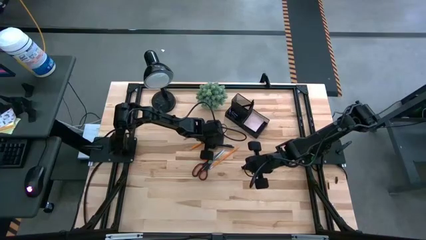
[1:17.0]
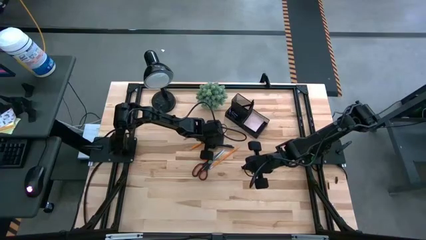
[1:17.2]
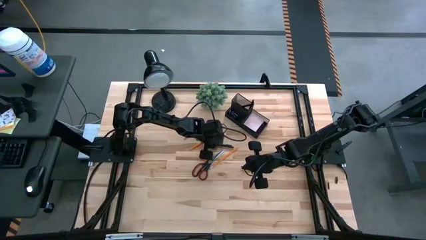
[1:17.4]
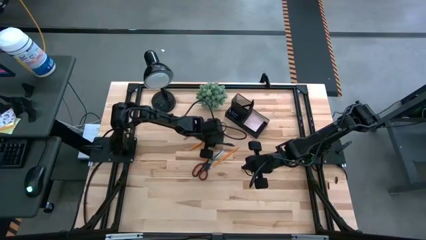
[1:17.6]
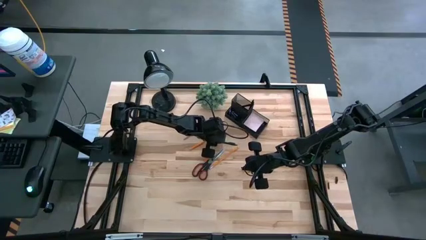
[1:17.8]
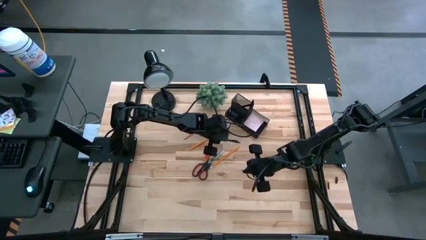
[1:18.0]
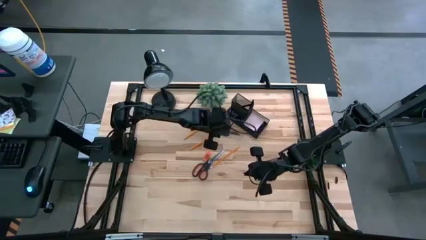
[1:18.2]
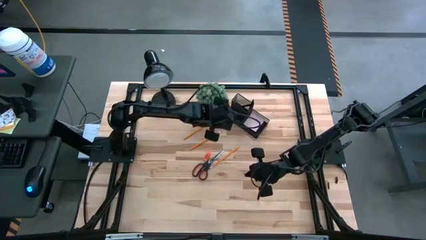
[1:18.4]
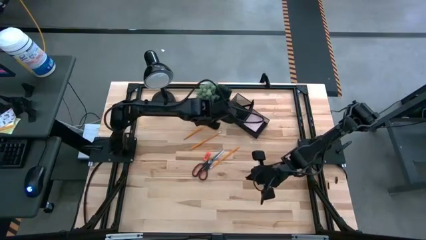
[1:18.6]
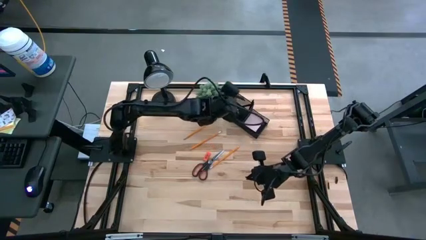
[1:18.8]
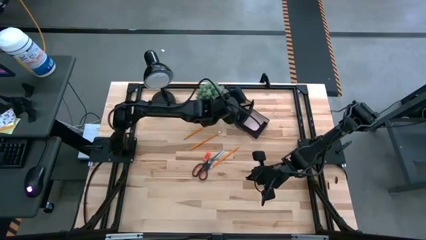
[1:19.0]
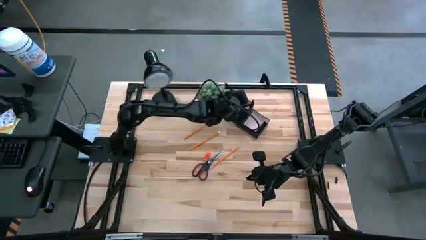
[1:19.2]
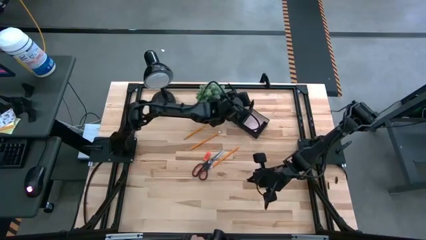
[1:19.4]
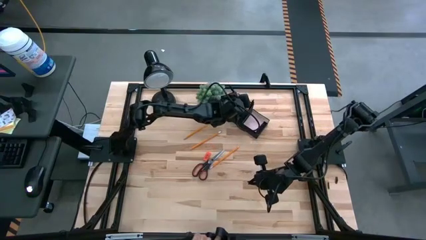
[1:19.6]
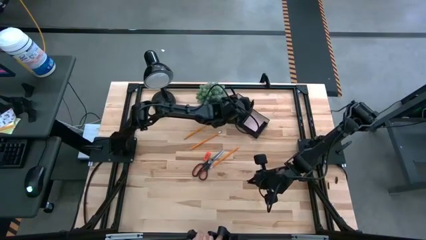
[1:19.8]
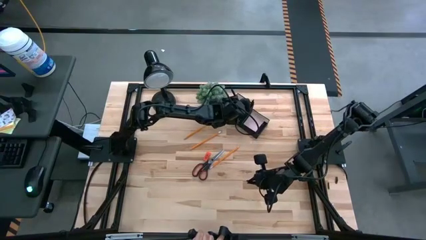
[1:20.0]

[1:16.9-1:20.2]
Task: Pick and place office supplies into organizer
Put the black ballpen into the black desk organizer

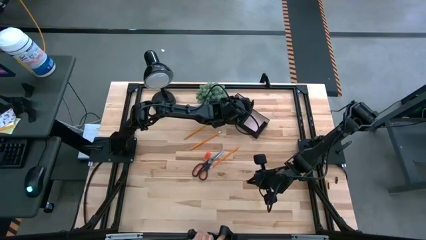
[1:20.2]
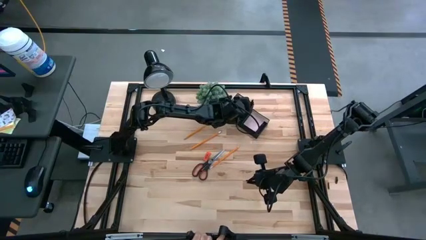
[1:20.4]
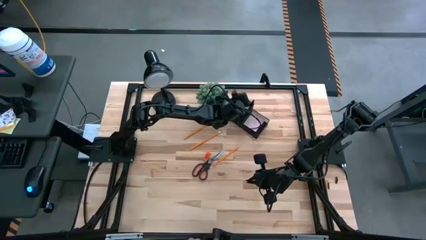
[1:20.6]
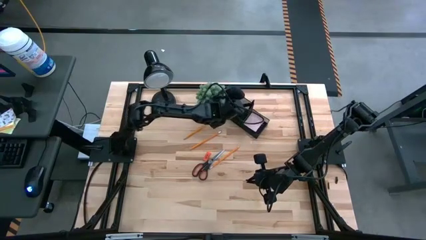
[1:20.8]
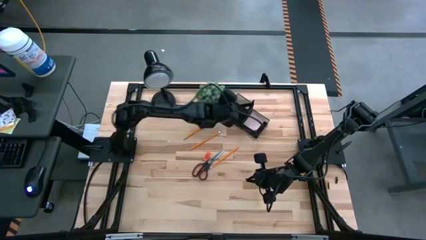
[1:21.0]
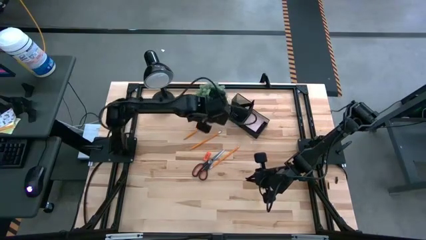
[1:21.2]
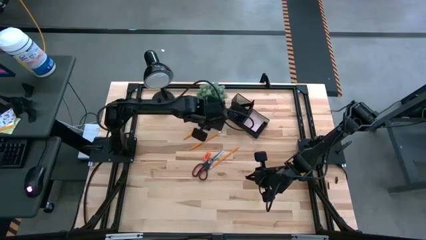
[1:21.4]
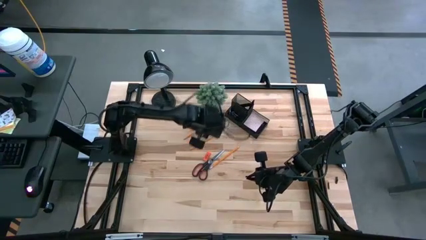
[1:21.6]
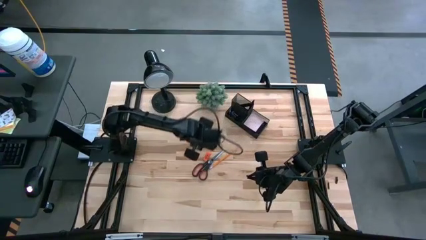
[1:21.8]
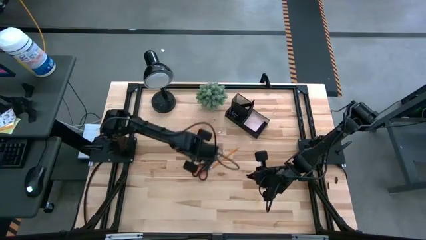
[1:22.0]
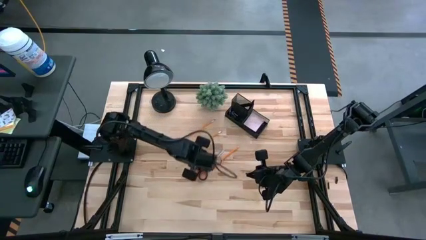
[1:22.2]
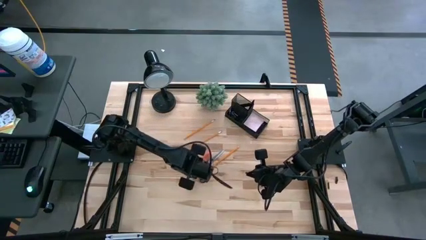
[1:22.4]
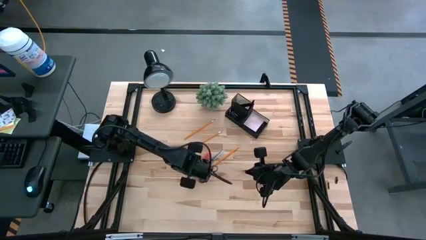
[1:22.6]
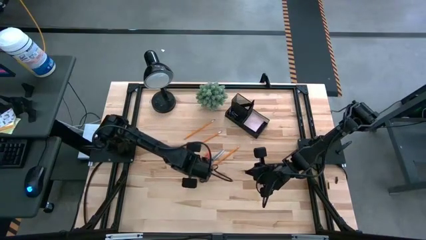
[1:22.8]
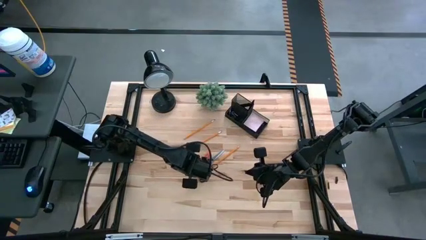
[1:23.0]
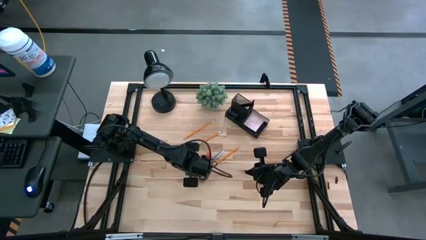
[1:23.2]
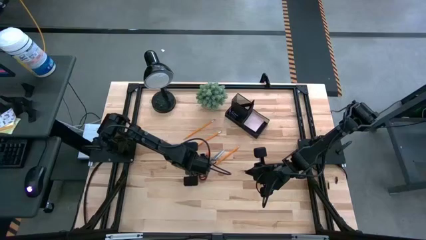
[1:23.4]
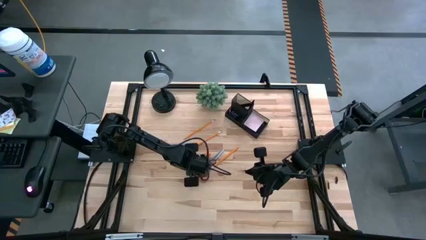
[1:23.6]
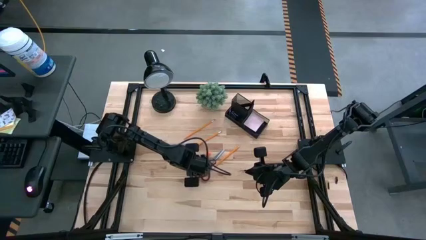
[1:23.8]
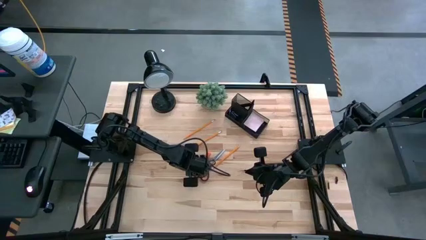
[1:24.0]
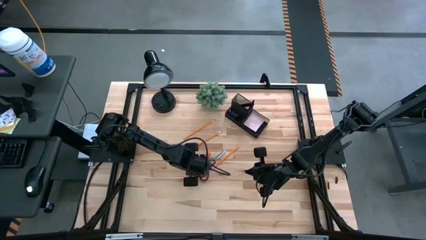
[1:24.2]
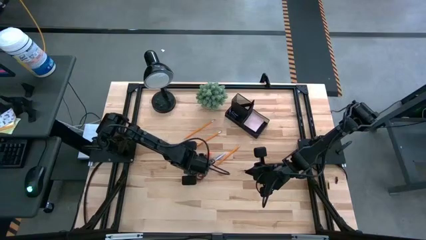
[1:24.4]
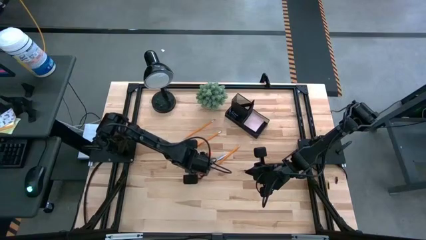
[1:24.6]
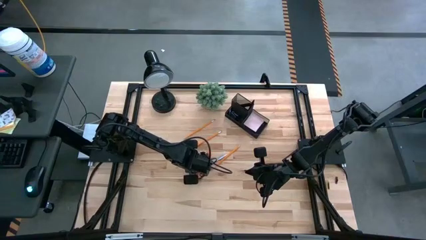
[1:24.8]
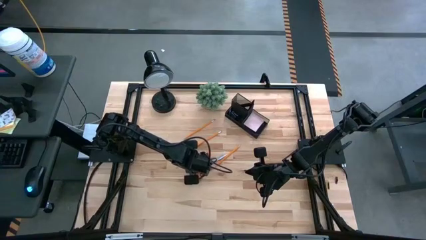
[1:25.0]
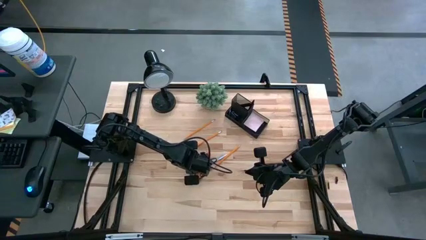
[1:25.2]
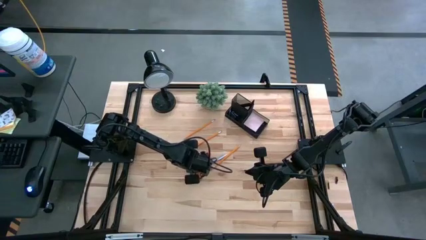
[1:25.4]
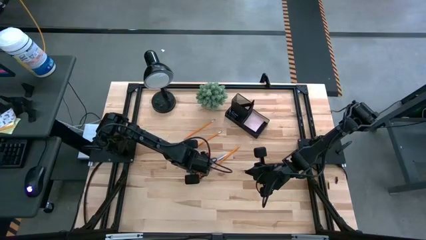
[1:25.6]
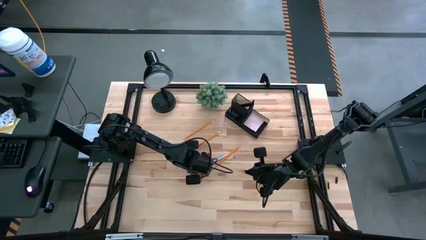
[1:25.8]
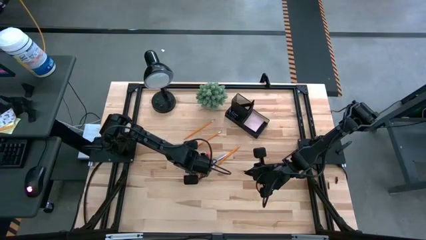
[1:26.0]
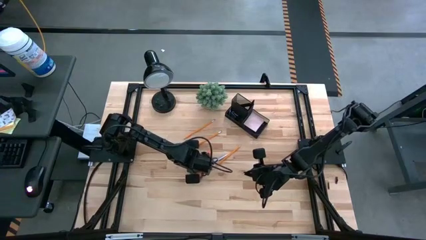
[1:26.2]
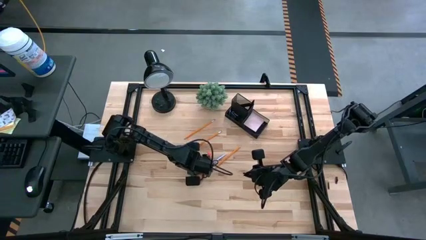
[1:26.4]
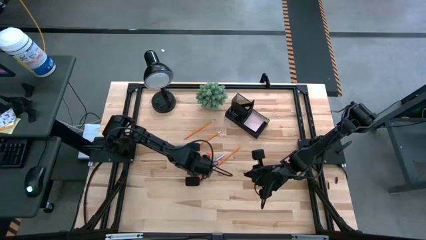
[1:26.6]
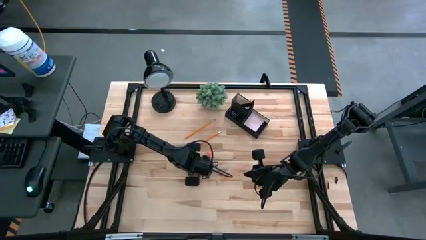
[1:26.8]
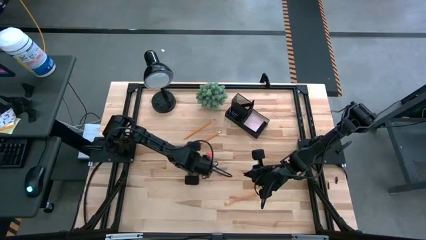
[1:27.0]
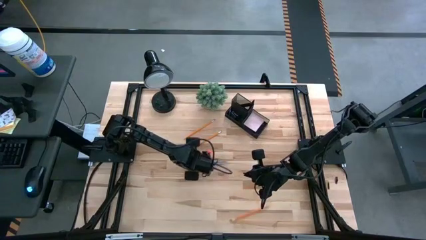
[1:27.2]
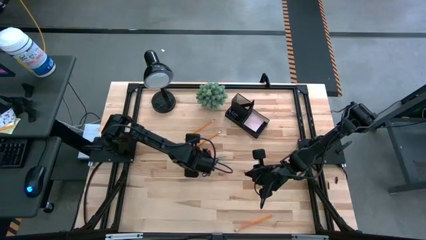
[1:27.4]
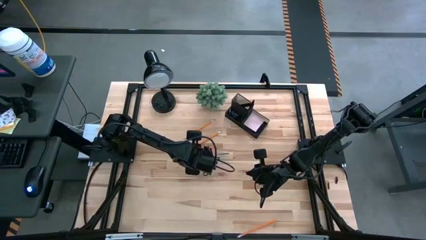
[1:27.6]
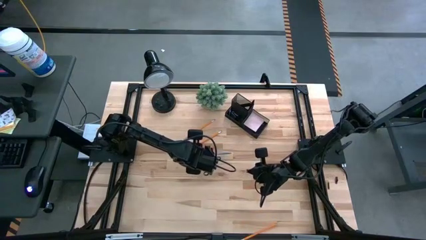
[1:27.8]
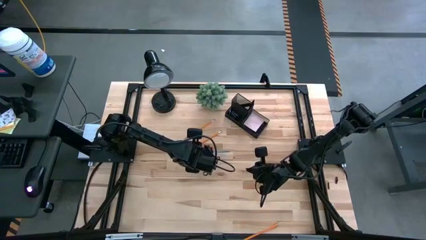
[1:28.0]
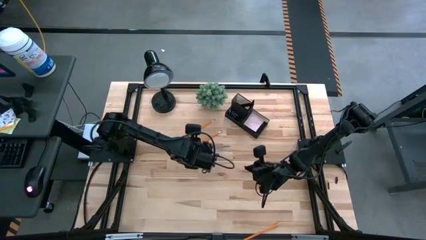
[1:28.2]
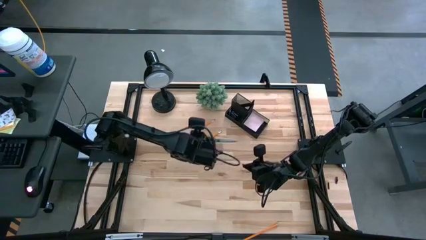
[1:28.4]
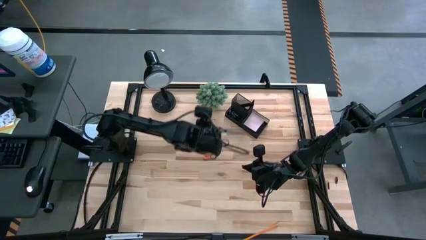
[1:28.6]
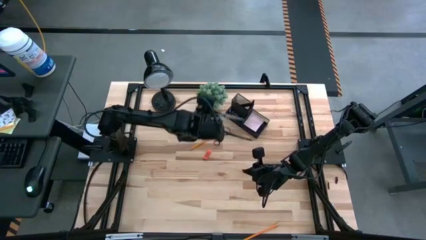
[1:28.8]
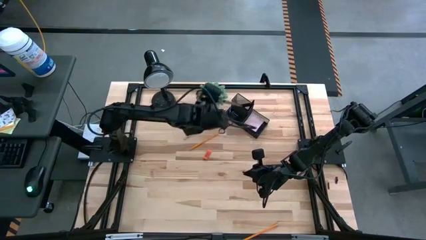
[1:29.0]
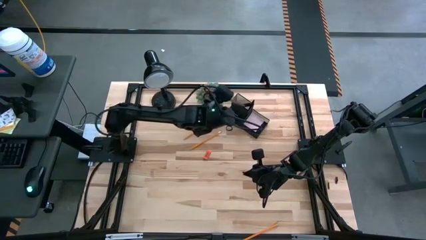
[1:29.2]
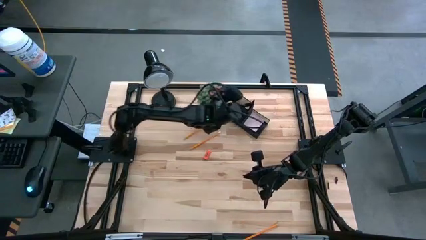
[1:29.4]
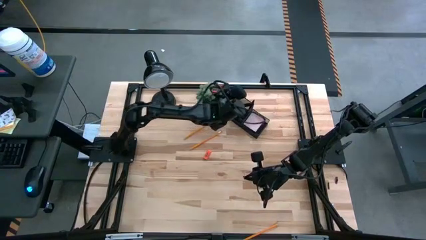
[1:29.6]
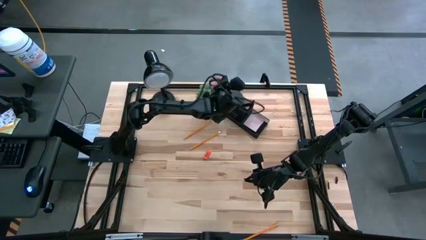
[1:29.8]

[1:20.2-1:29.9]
Put the black scissors into the black desk organizer

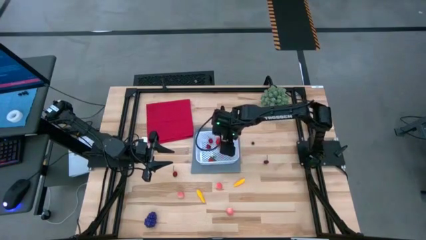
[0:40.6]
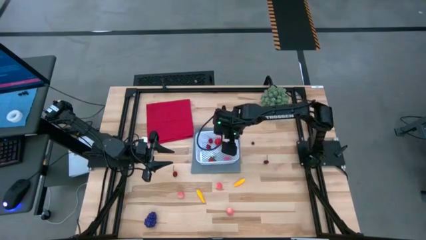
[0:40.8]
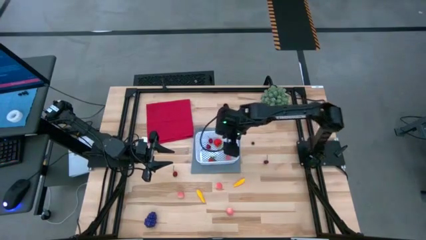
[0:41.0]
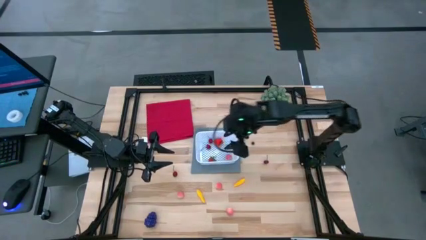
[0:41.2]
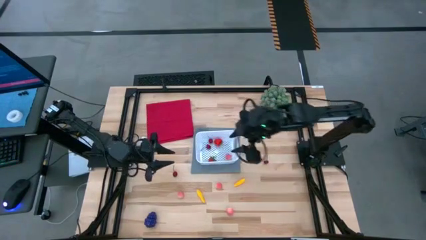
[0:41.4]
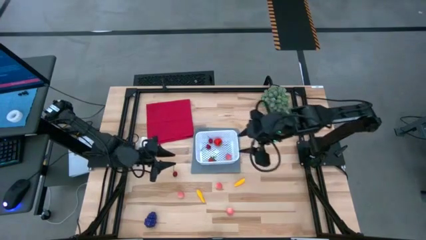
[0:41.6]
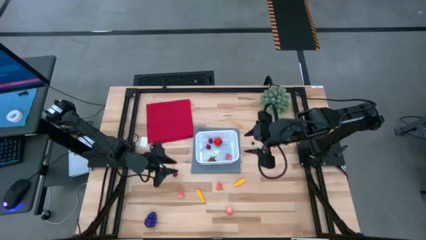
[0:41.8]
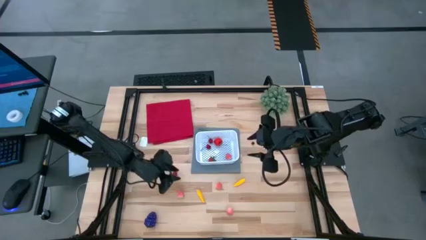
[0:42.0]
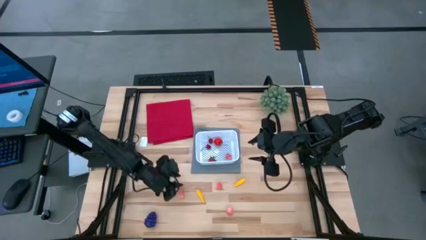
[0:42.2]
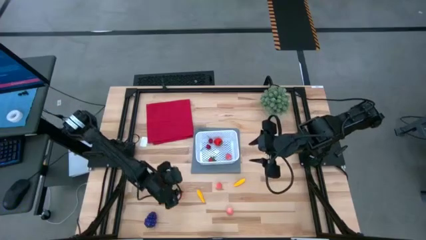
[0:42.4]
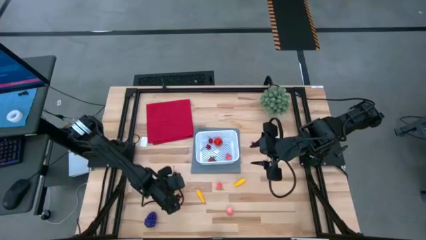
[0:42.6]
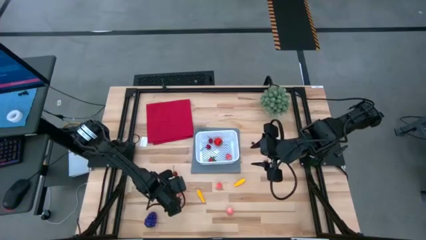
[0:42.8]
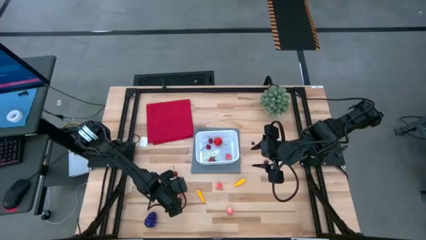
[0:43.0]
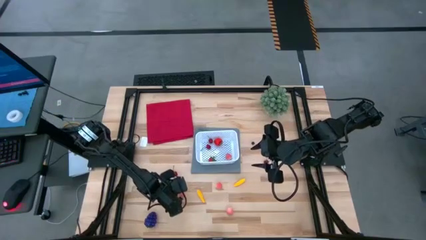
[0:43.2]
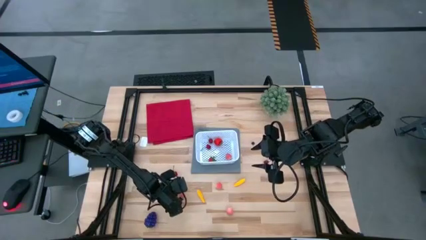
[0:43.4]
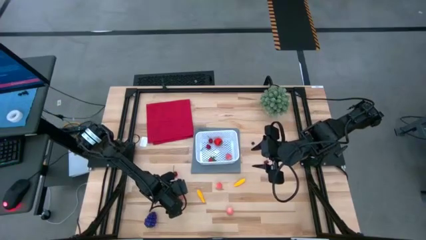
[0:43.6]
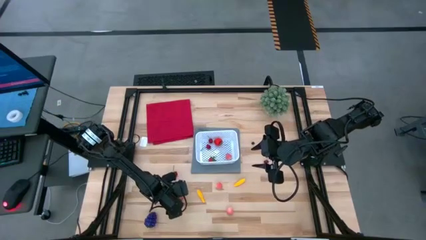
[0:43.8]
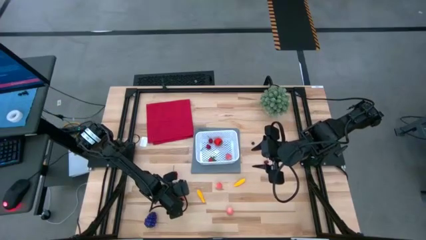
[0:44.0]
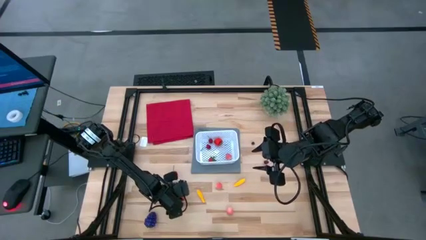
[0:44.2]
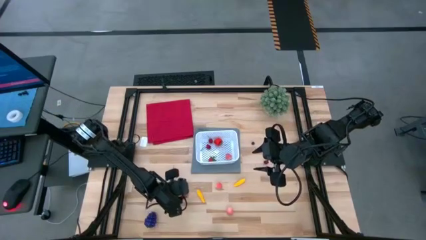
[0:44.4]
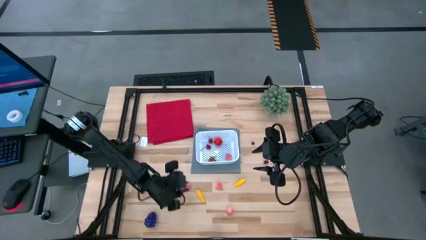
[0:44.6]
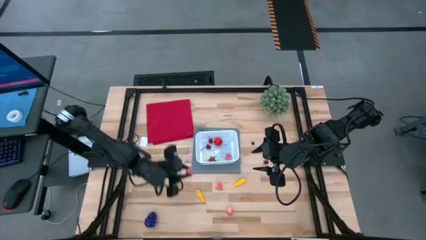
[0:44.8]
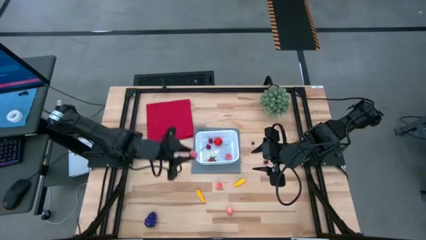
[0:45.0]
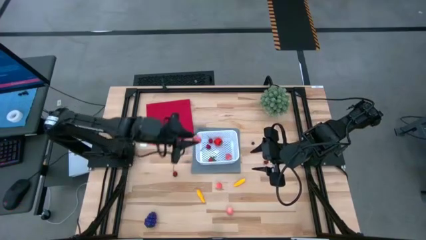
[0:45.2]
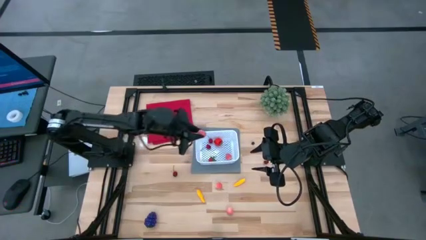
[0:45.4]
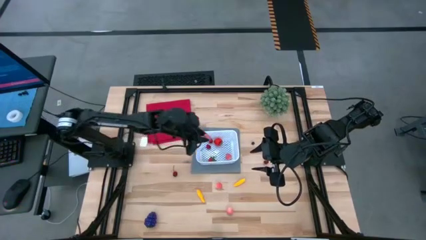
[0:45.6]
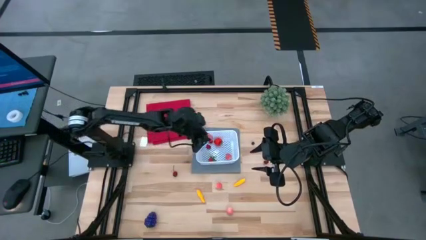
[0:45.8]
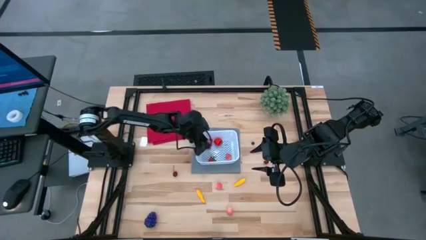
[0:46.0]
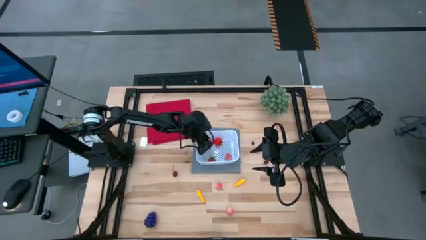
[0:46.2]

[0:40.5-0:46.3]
Task: Pick and placing Produce into tupperware
Put the top left peach into the white basket
